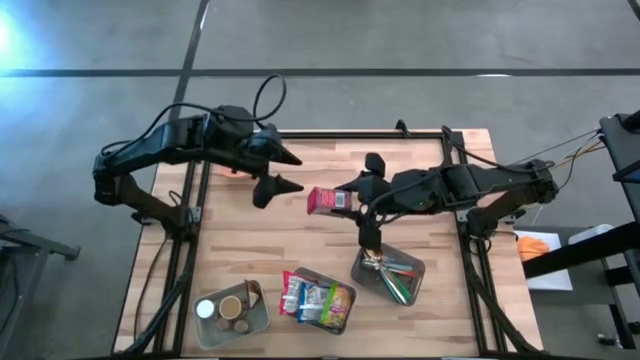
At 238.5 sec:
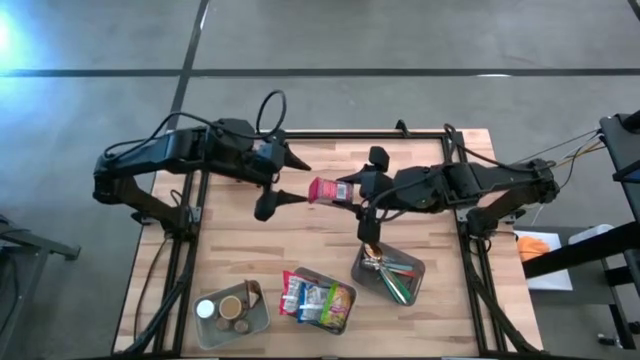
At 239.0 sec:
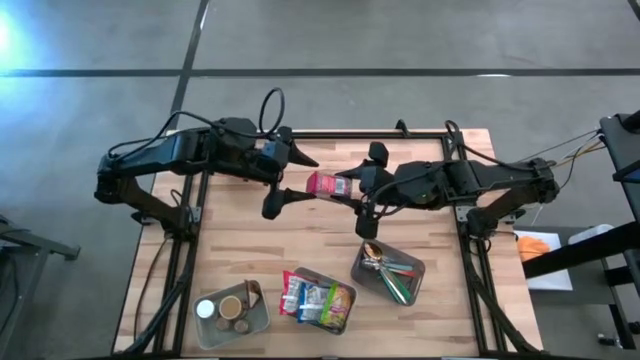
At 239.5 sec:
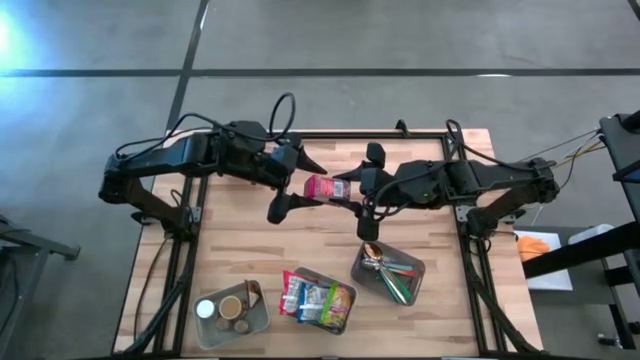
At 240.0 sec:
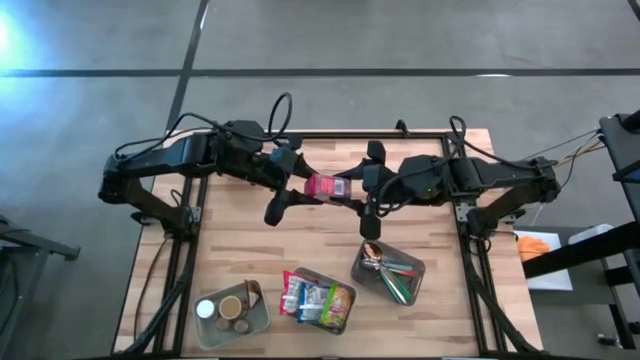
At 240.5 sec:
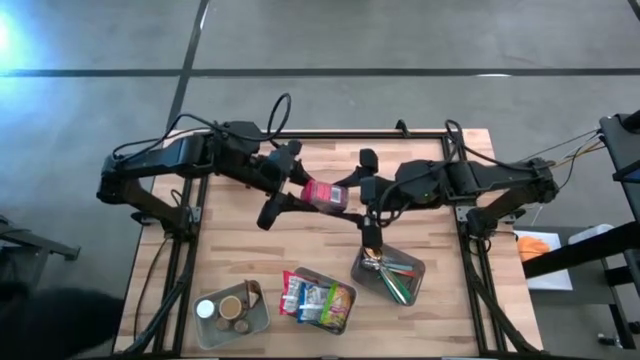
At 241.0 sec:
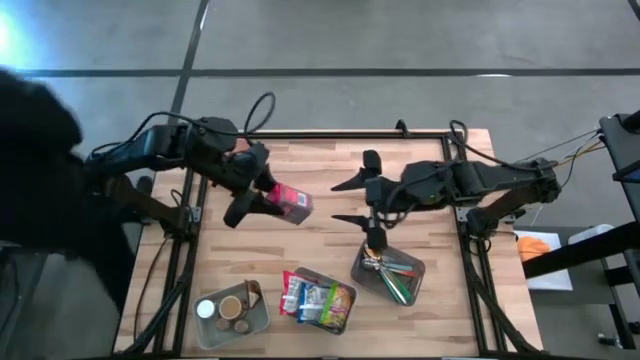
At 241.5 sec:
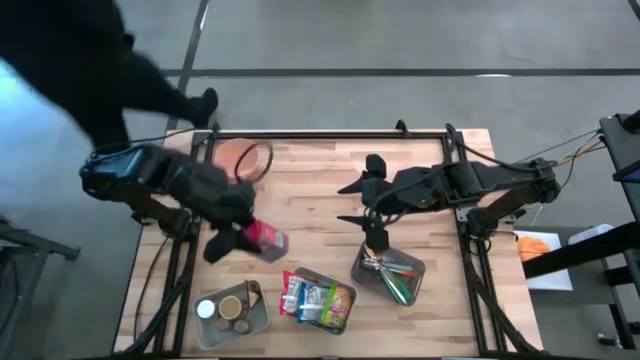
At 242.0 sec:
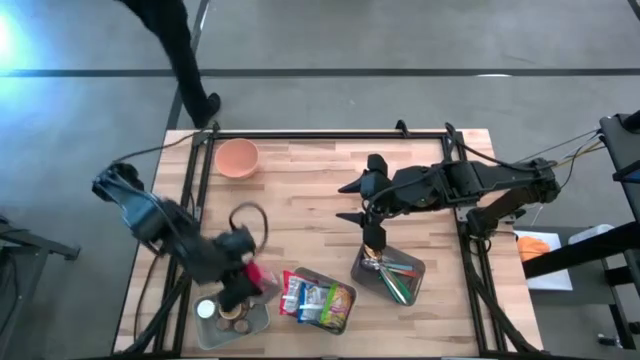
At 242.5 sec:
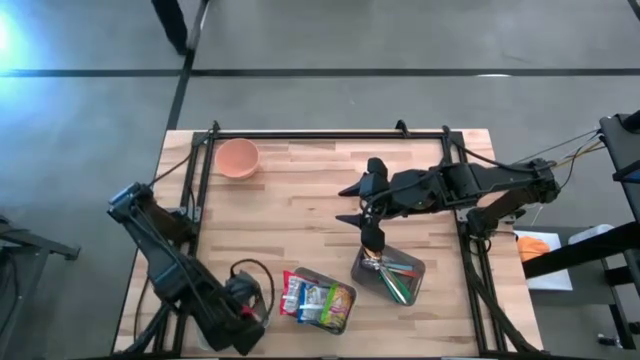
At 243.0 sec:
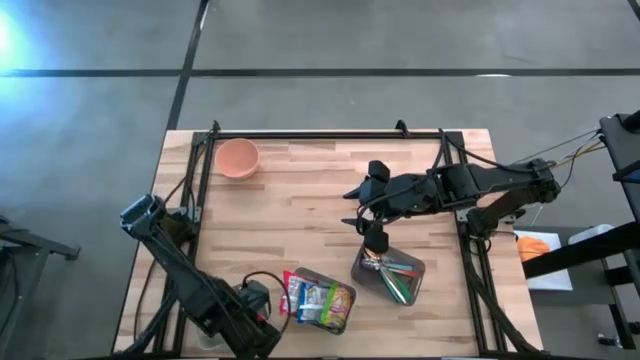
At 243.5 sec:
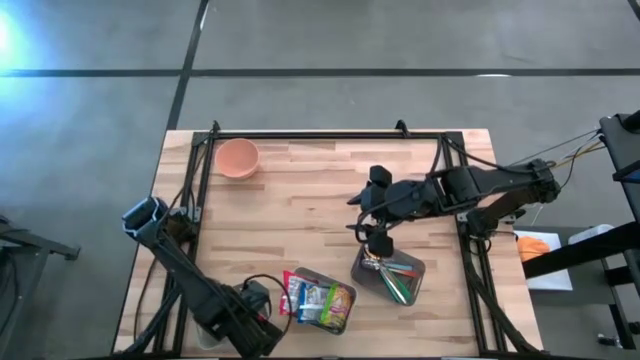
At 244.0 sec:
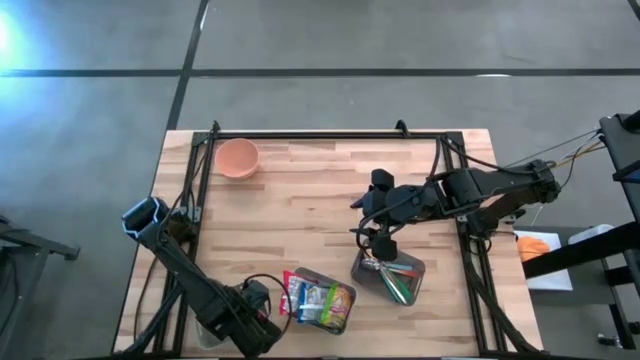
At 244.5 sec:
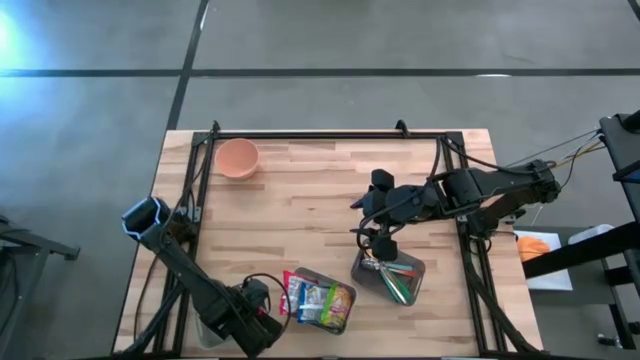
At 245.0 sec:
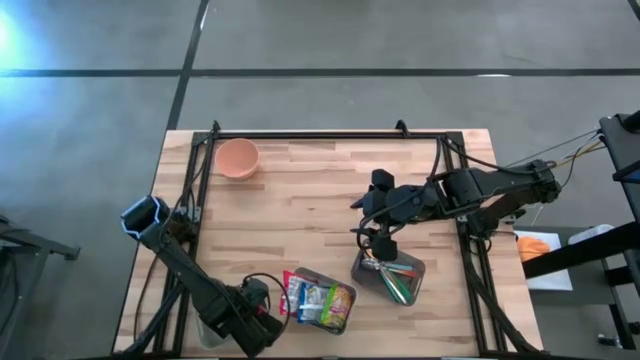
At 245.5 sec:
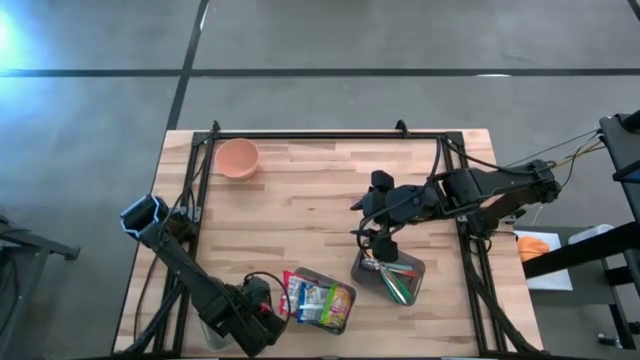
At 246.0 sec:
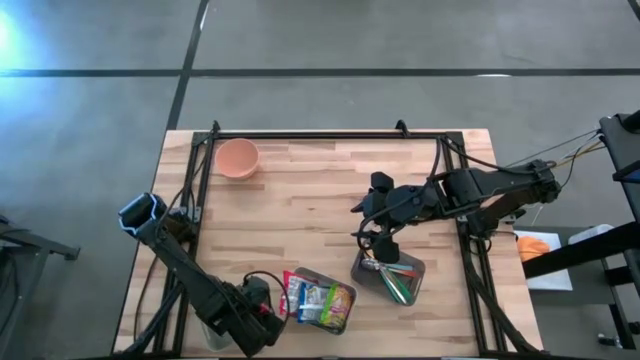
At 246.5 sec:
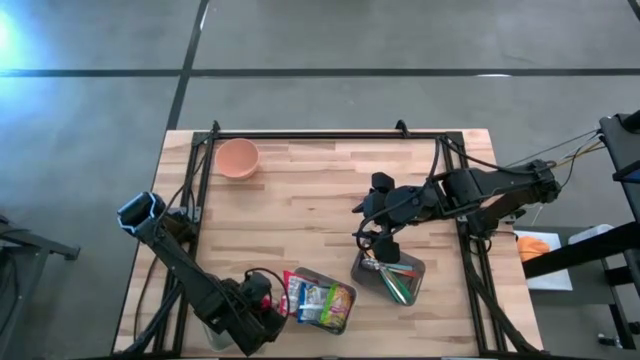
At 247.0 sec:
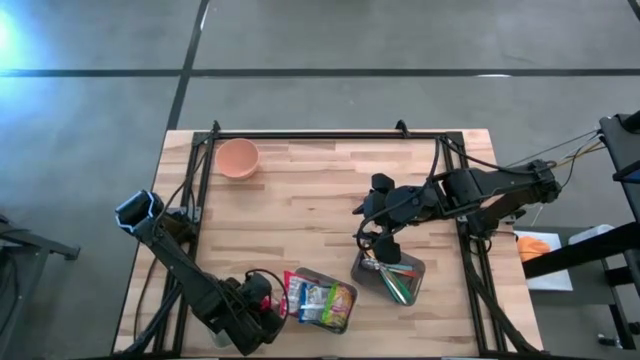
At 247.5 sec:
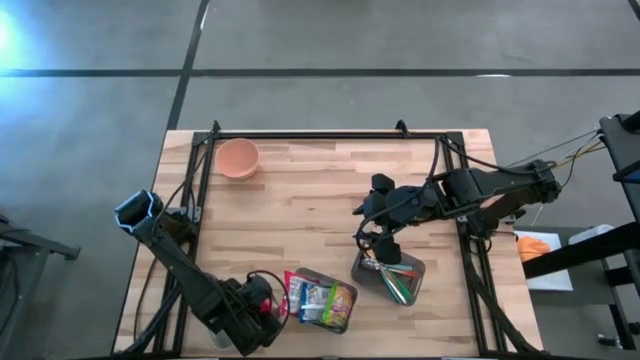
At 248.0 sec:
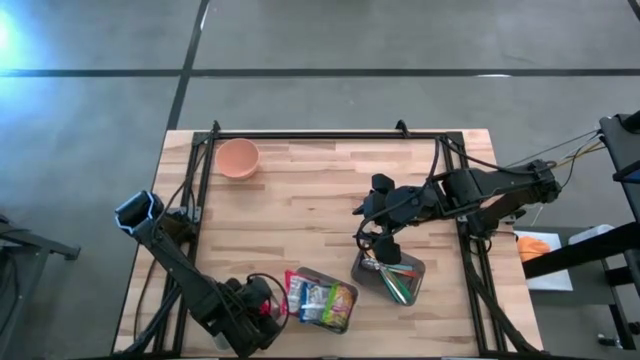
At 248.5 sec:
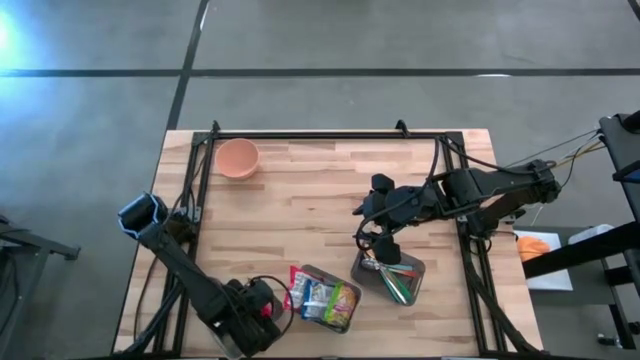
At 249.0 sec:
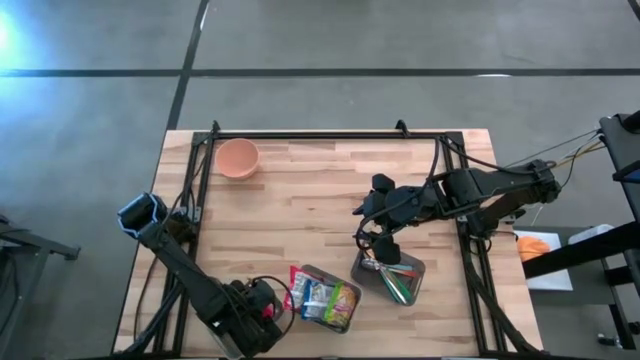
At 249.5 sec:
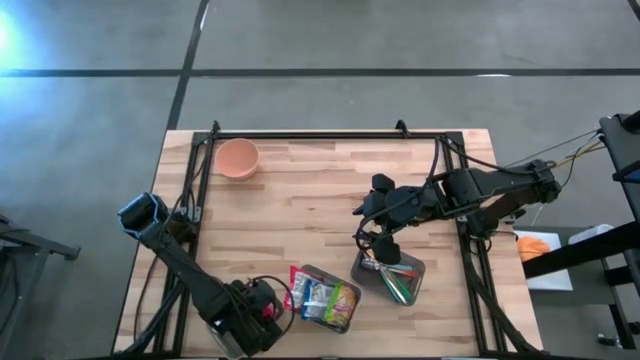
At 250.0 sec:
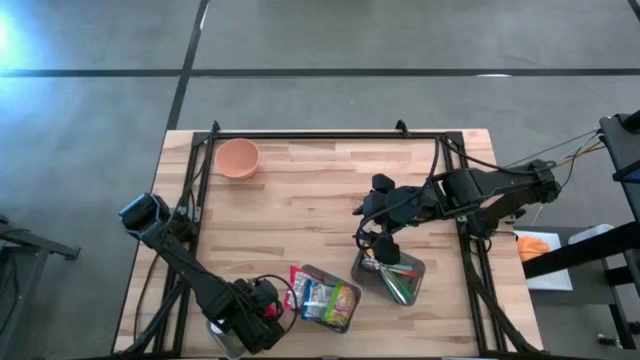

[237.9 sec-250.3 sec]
Put the red seasoning into the left gray bin

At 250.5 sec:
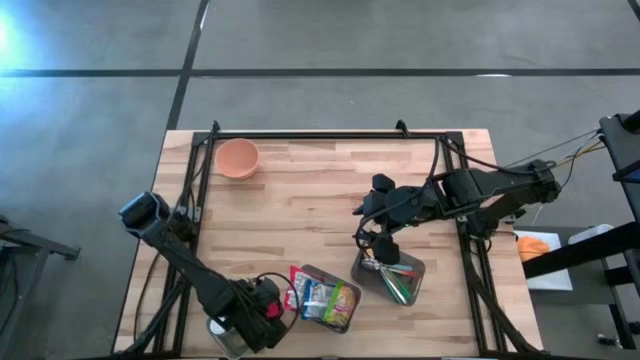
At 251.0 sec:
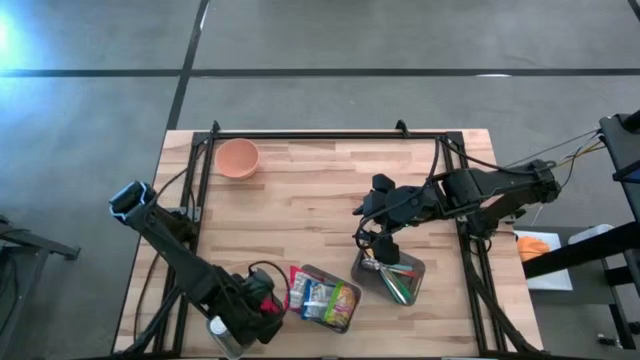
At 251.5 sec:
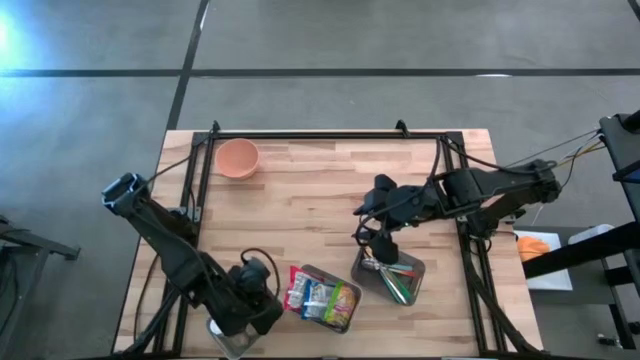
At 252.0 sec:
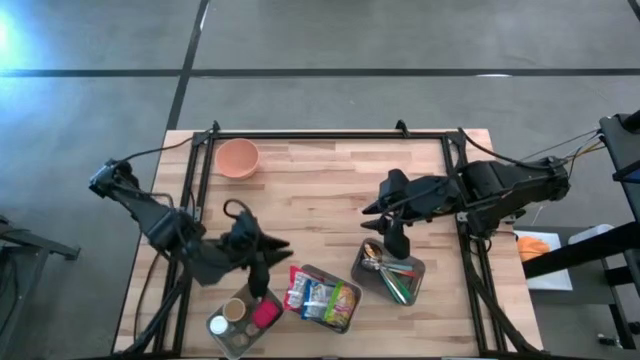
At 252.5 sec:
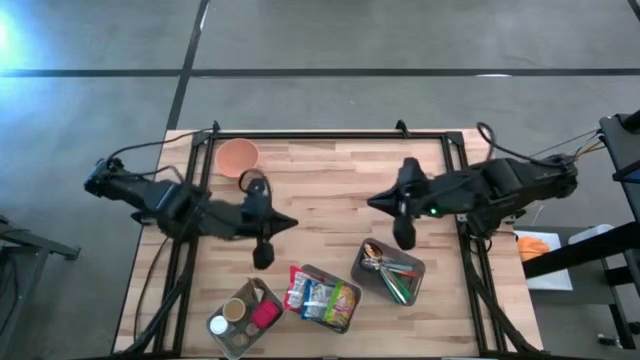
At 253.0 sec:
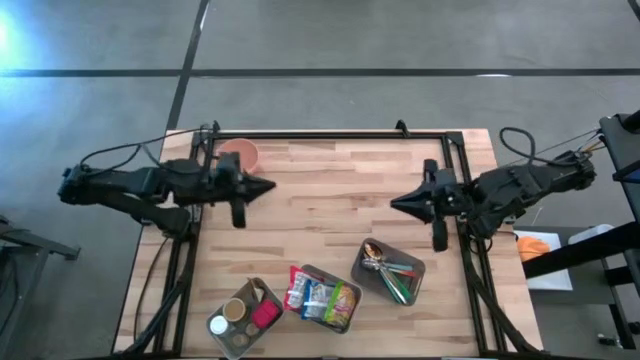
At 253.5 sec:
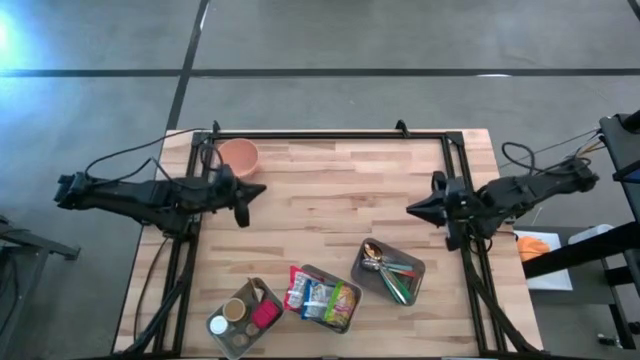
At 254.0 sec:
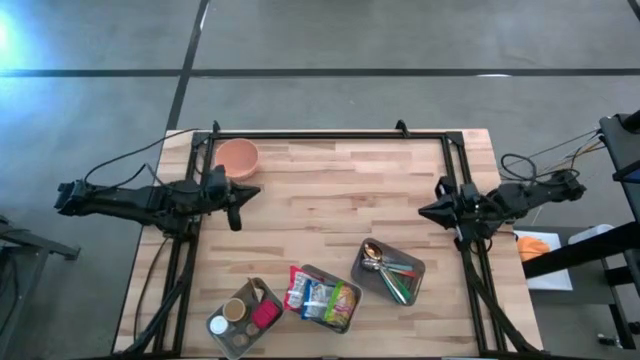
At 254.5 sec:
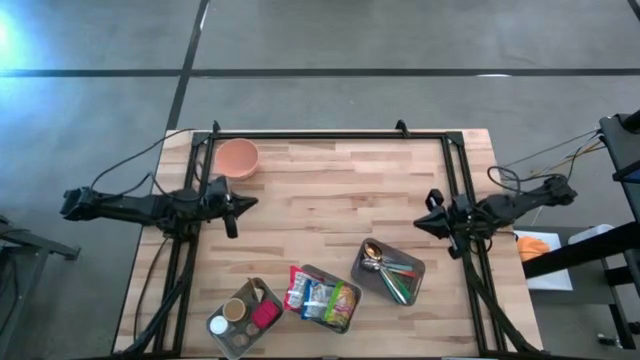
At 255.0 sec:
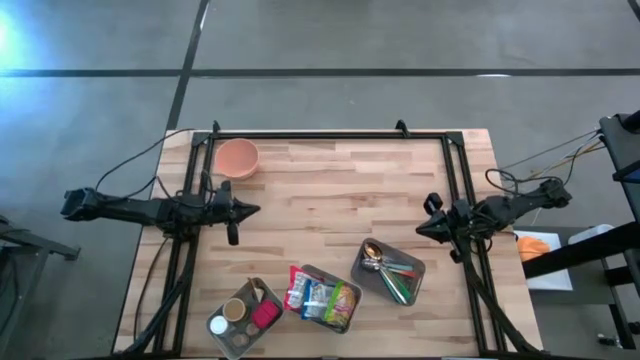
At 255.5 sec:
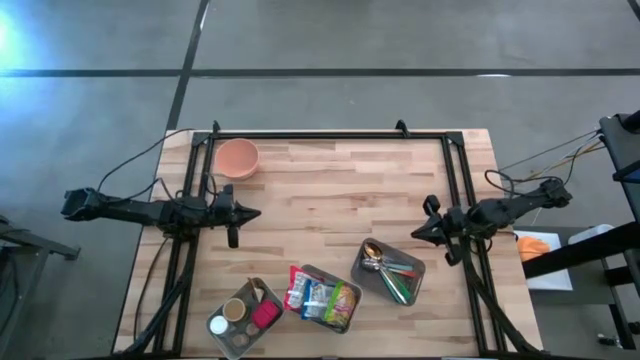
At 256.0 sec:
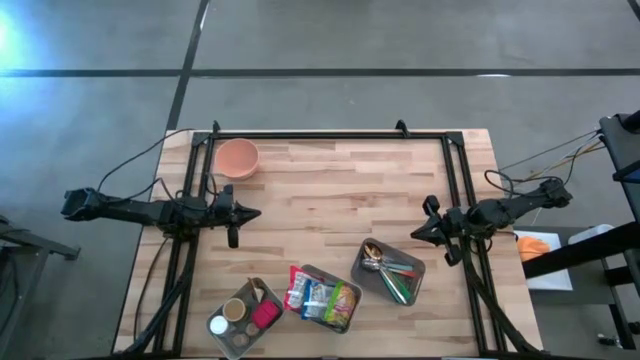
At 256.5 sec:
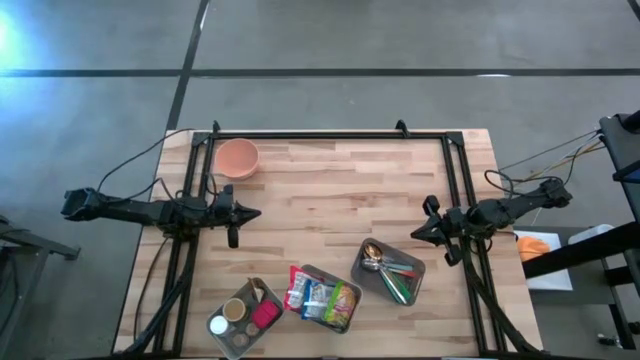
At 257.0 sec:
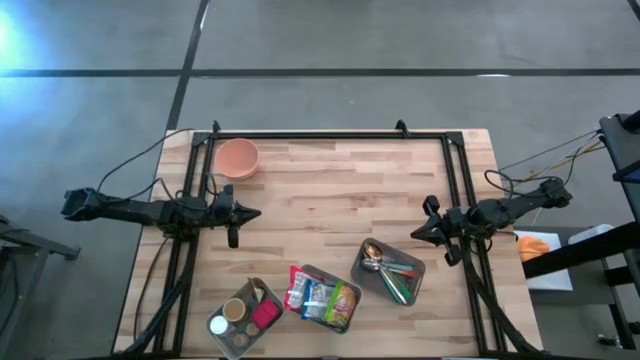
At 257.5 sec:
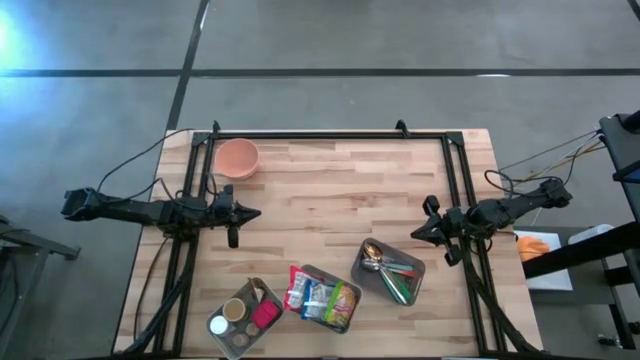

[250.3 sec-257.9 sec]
Return to home position
